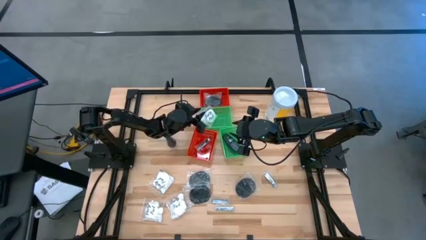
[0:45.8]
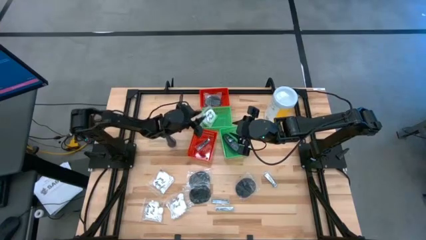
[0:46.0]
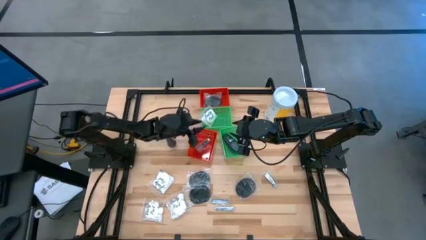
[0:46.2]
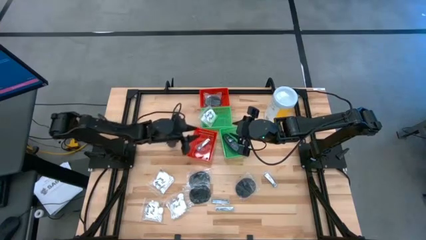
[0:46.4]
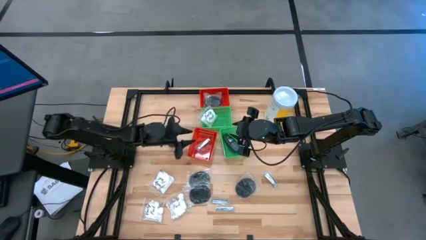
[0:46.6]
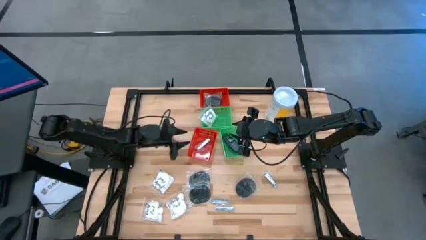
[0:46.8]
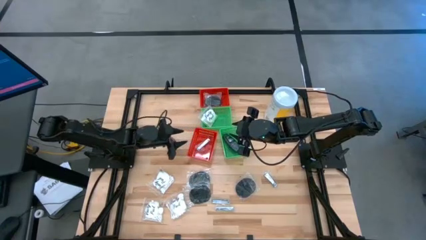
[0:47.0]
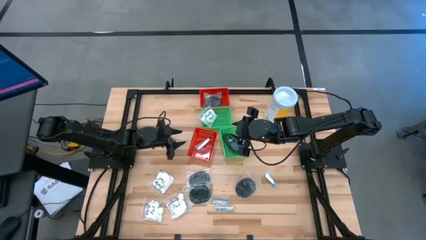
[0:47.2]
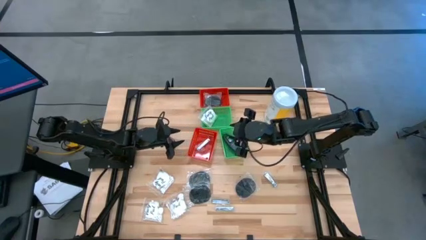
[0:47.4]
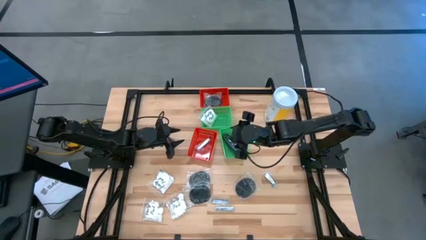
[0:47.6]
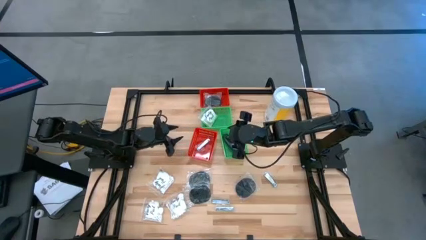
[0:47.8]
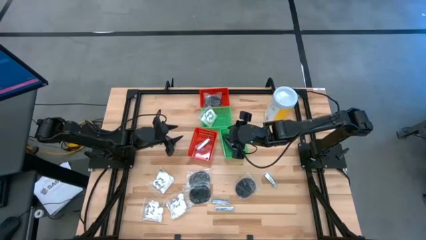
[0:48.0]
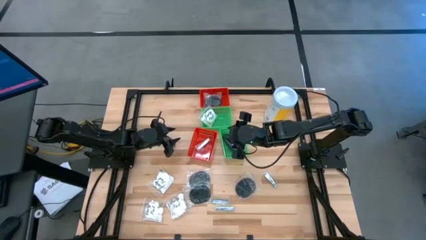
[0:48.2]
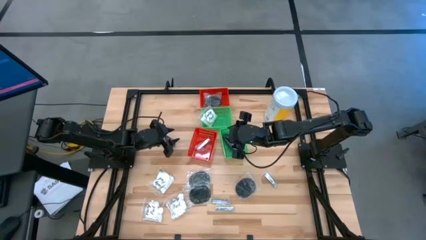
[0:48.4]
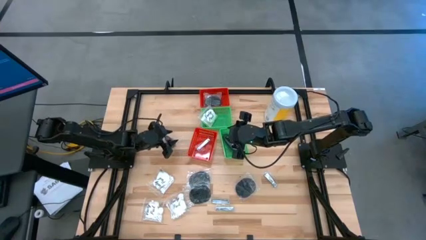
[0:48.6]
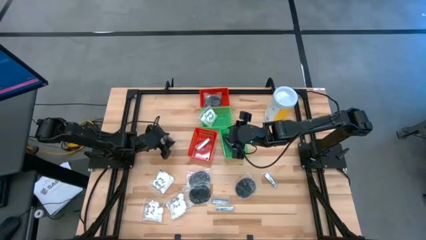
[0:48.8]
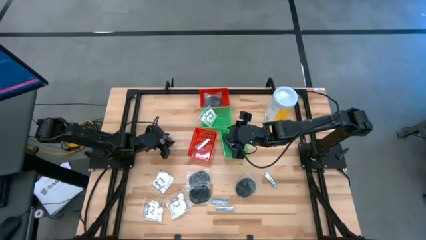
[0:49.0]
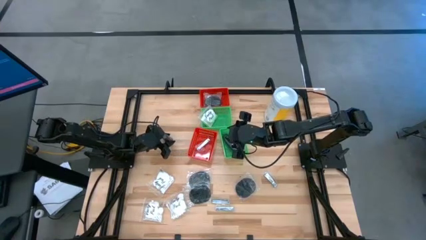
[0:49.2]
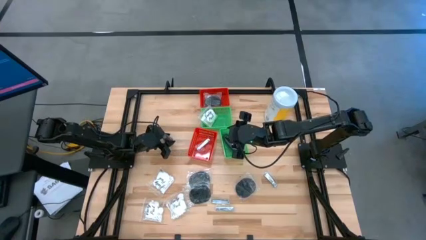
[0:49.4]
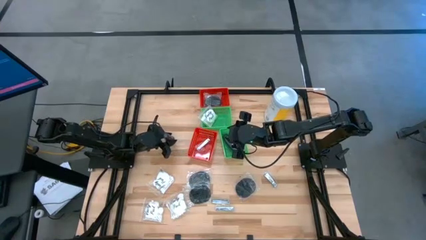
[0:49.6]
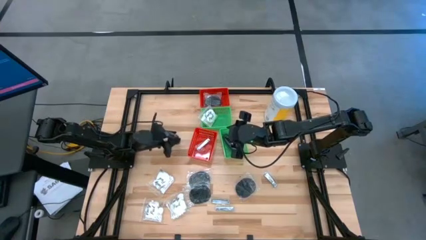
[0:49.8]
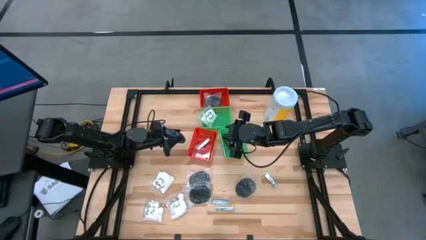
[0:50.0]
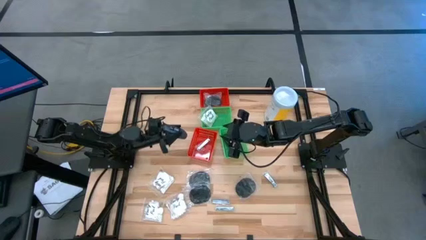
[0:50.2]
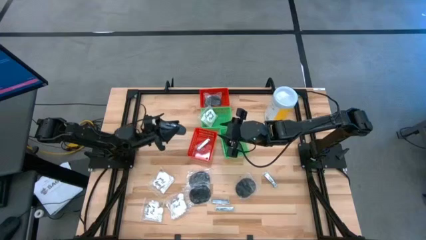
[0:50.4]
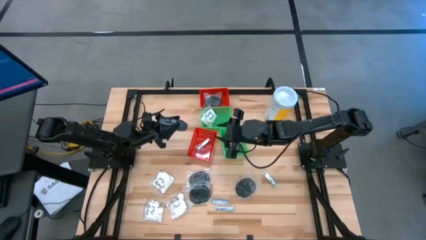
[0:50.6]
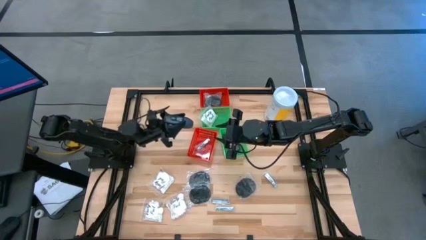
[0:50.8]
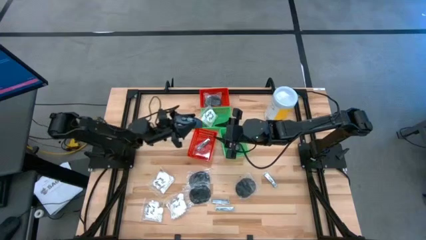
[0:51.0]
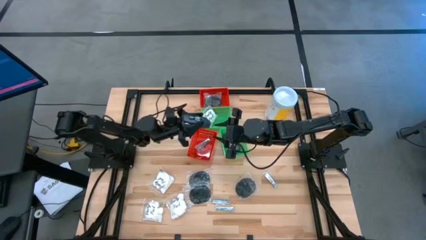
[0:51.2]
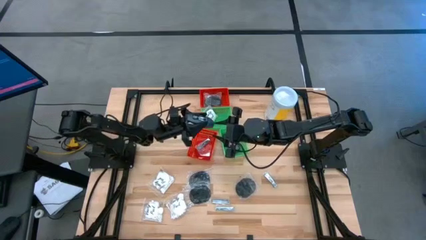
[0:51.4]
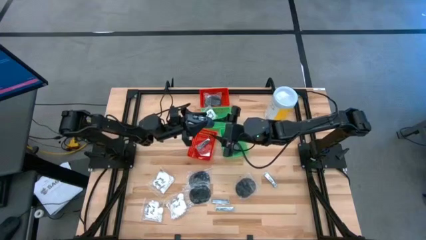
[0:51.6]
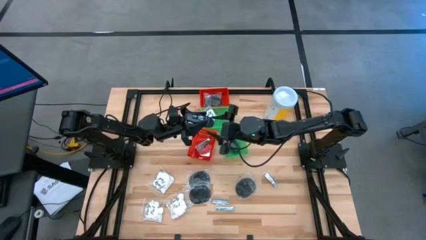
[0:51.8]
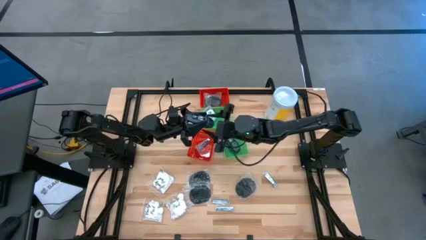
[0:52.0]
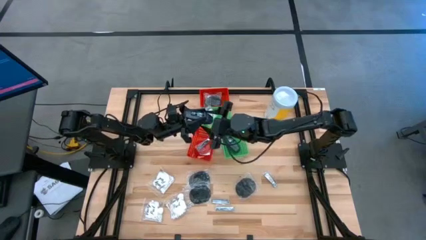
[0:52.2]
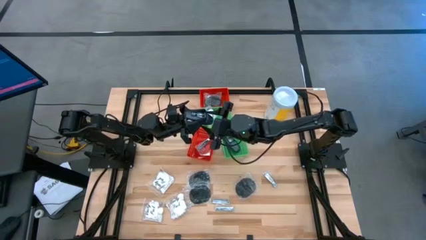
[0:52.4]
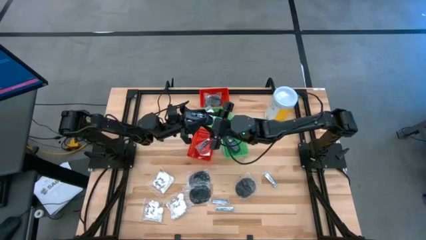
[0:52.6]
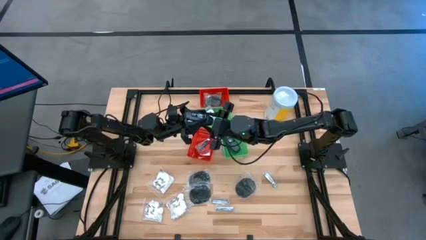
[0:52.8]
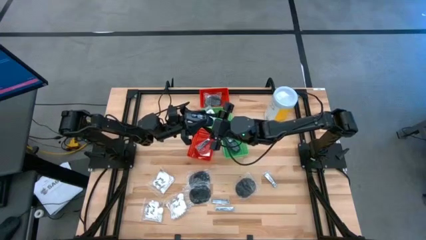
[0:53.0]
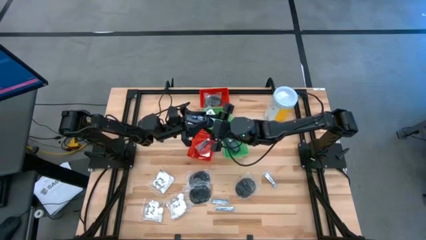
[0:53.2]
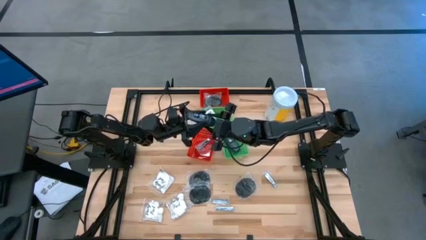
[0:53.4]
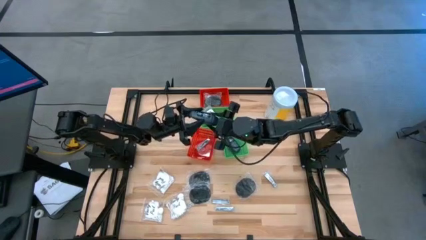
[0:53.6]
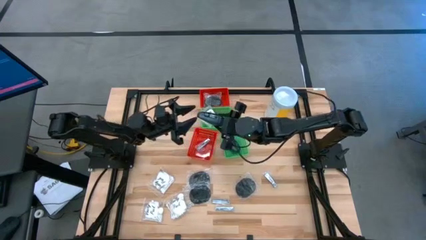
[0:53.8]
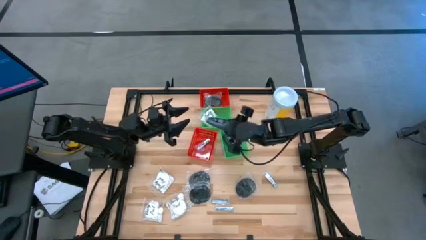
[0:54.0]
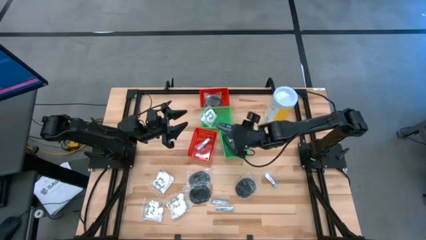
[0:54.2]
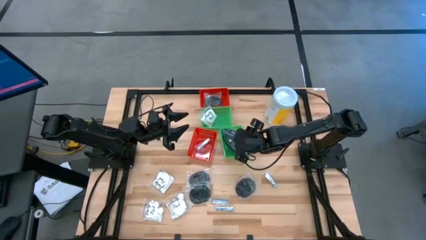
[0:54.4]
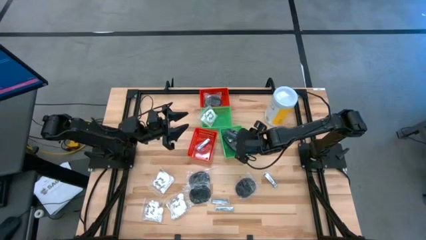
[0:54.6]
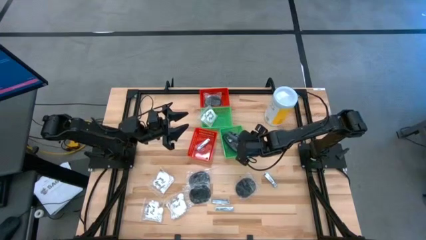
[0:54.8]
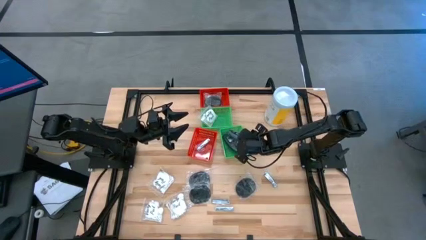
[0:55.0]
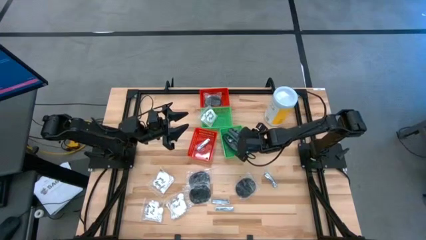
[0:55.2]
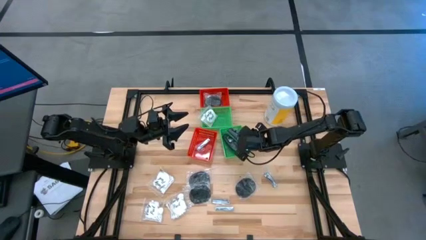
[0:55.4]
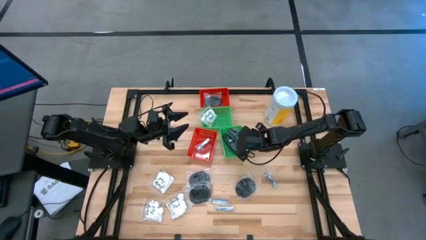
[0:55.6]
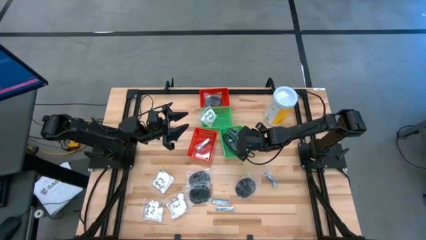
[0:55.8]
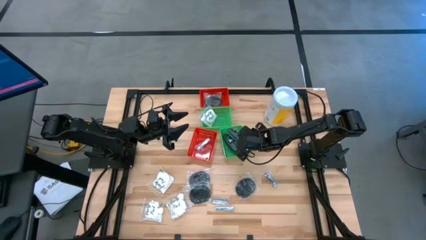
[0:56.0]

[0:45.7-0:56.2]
Task: Pick & Place Travel size toiletries
Put the black deodorant into the bottom green bin
